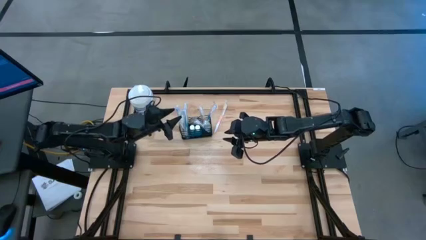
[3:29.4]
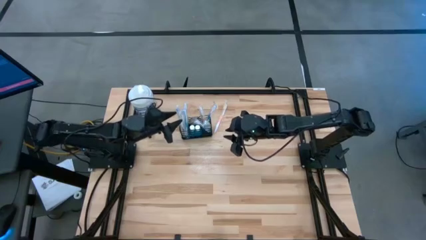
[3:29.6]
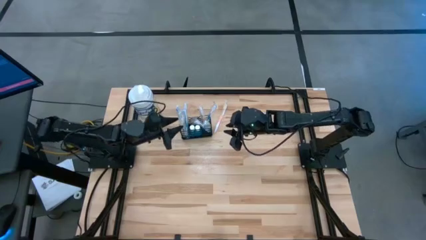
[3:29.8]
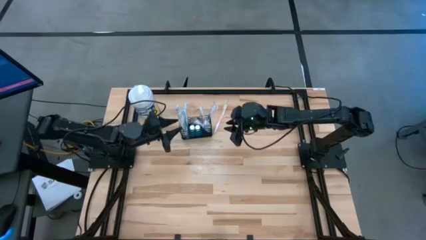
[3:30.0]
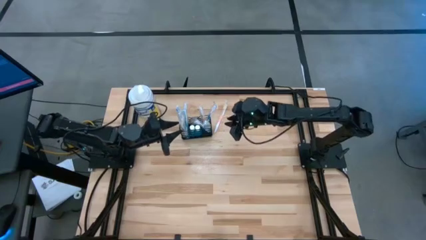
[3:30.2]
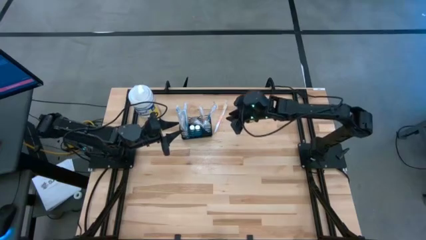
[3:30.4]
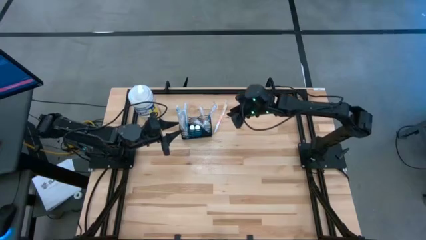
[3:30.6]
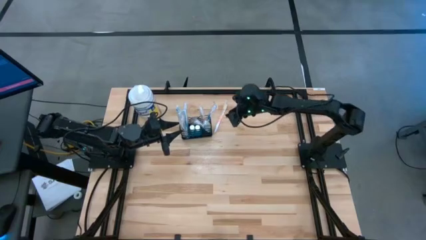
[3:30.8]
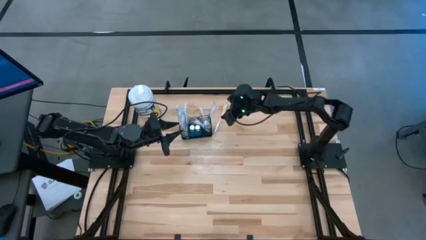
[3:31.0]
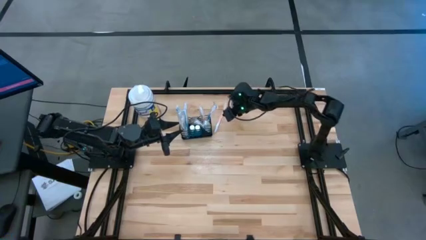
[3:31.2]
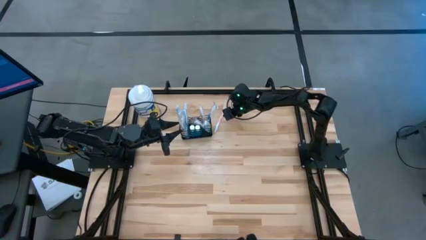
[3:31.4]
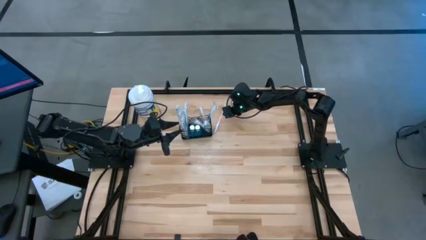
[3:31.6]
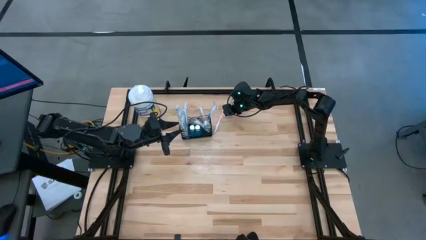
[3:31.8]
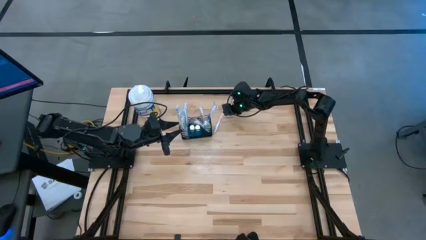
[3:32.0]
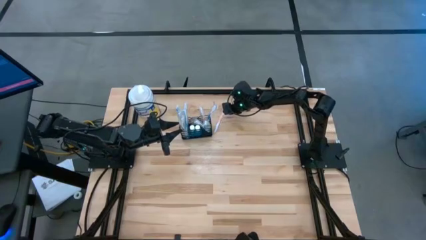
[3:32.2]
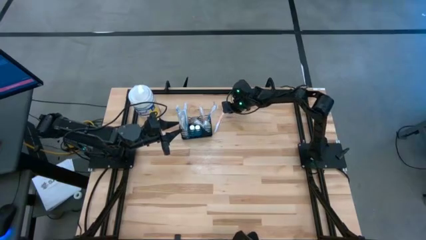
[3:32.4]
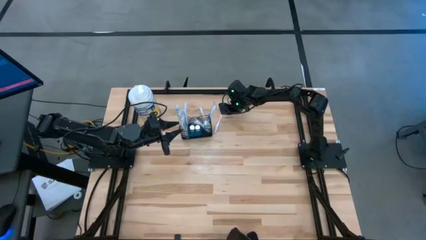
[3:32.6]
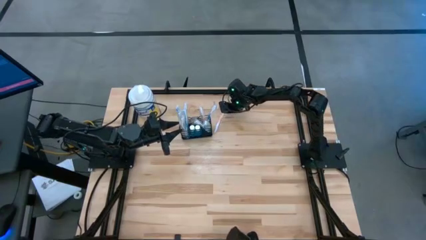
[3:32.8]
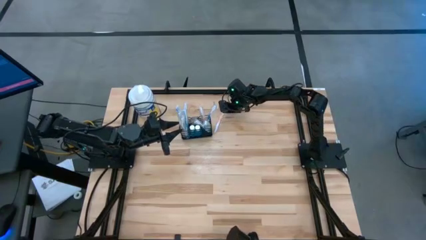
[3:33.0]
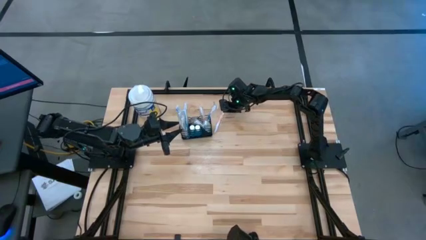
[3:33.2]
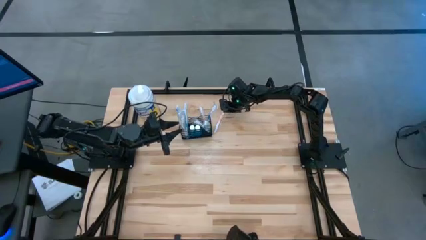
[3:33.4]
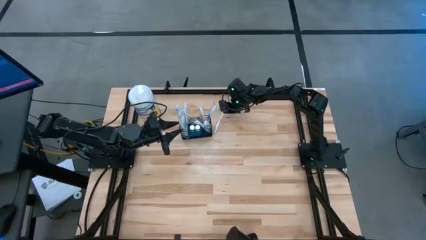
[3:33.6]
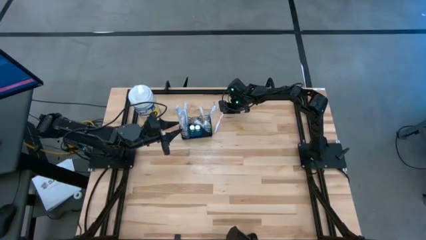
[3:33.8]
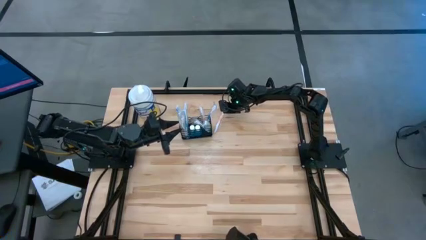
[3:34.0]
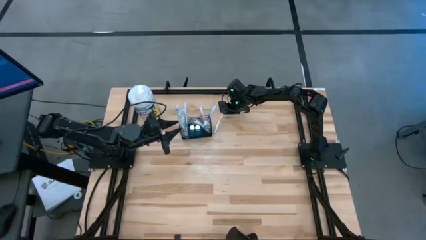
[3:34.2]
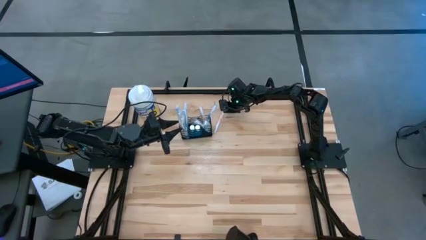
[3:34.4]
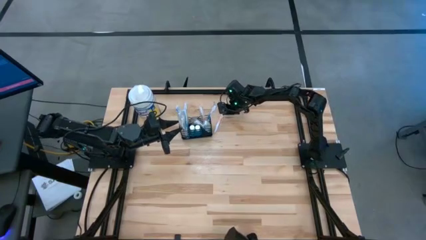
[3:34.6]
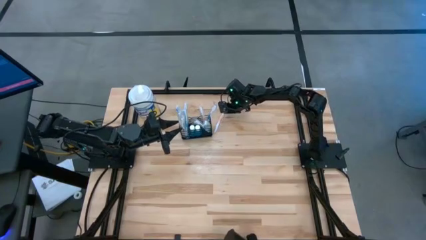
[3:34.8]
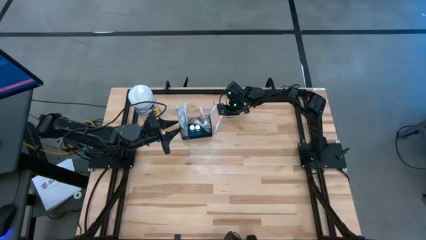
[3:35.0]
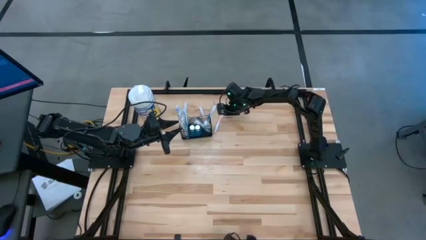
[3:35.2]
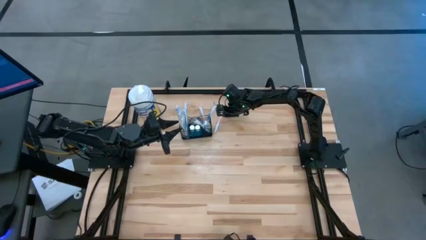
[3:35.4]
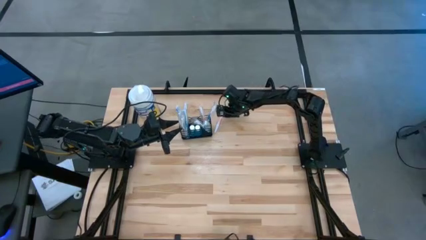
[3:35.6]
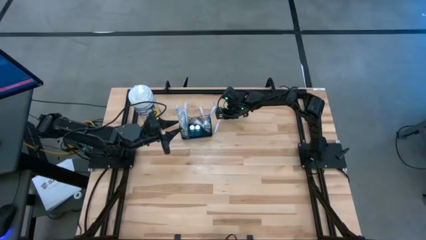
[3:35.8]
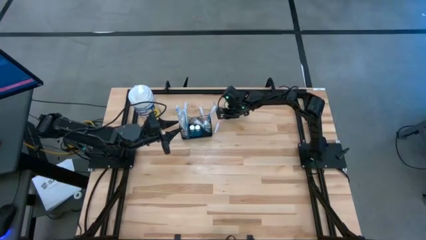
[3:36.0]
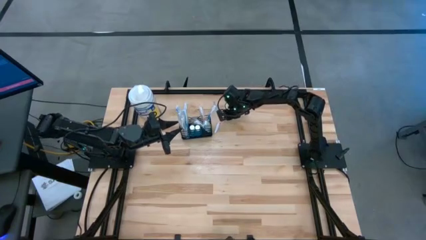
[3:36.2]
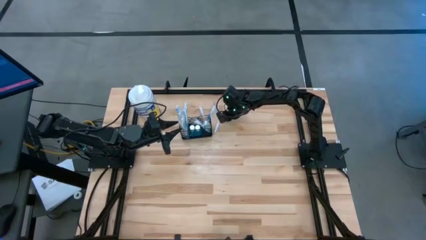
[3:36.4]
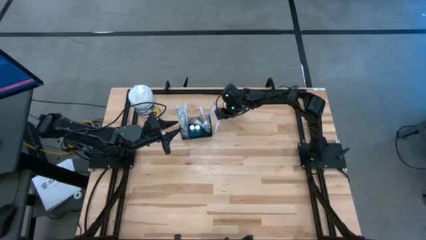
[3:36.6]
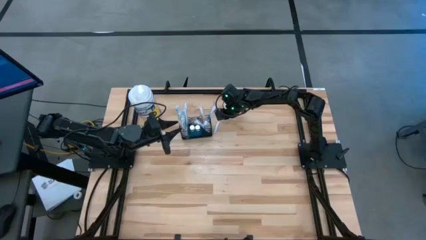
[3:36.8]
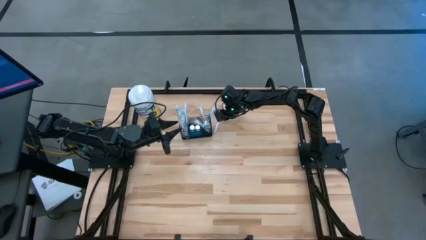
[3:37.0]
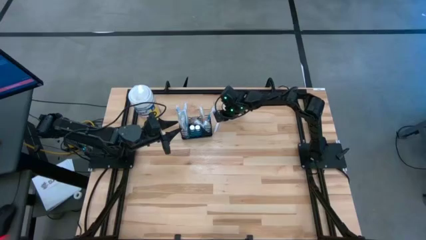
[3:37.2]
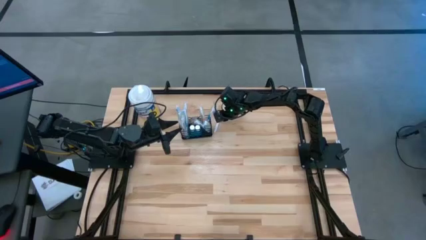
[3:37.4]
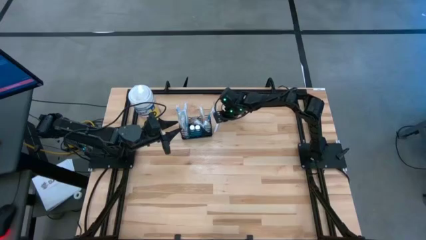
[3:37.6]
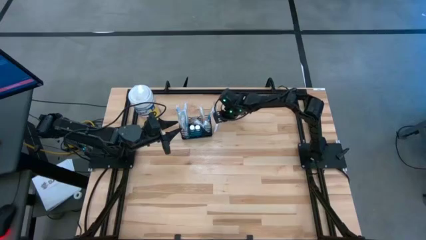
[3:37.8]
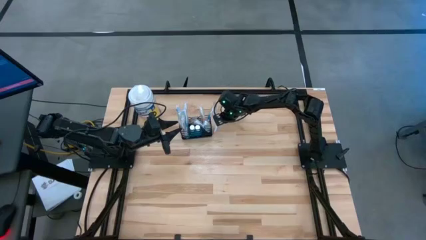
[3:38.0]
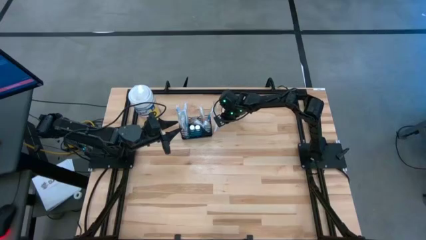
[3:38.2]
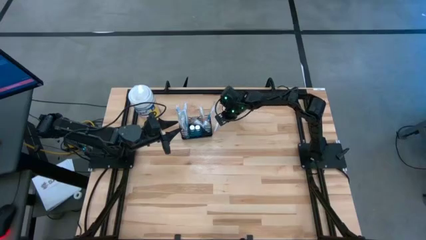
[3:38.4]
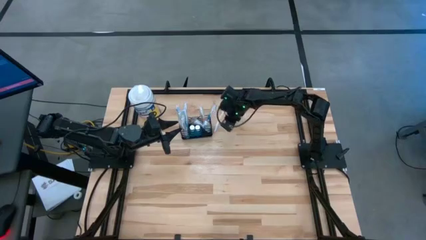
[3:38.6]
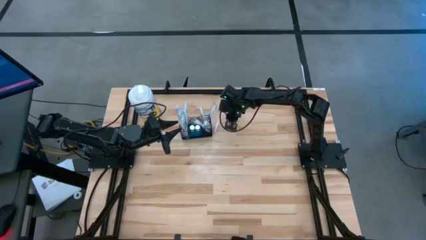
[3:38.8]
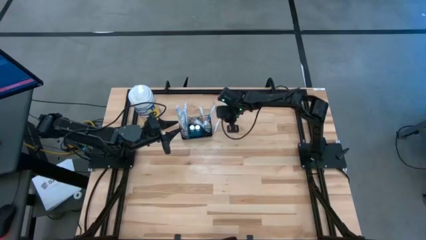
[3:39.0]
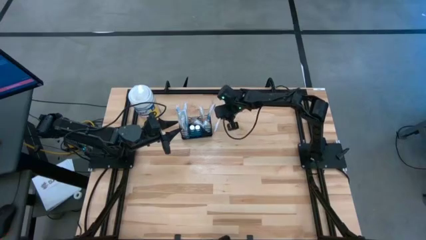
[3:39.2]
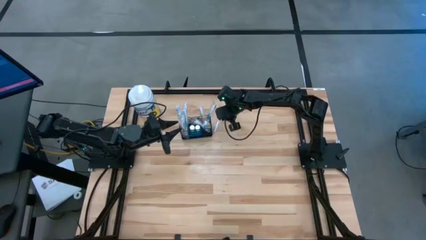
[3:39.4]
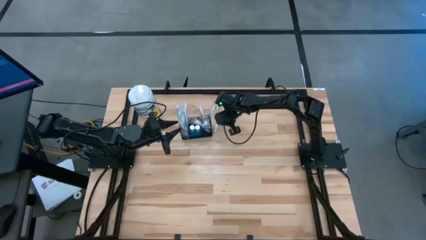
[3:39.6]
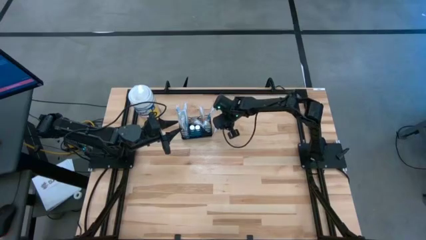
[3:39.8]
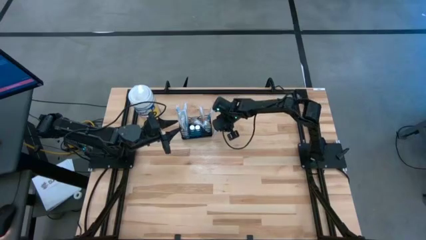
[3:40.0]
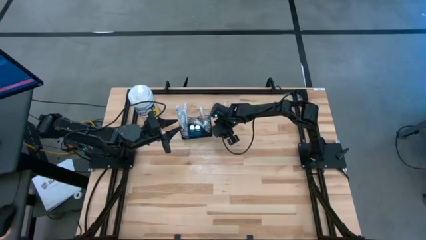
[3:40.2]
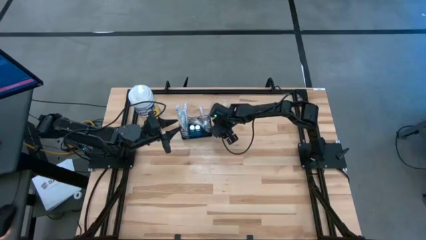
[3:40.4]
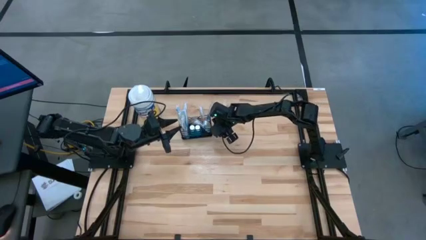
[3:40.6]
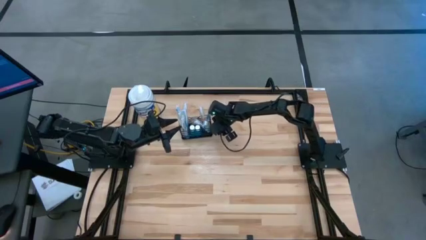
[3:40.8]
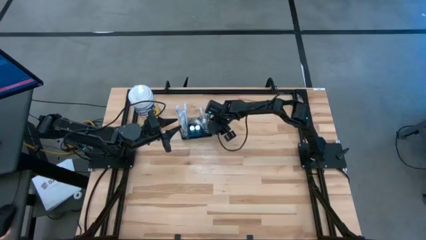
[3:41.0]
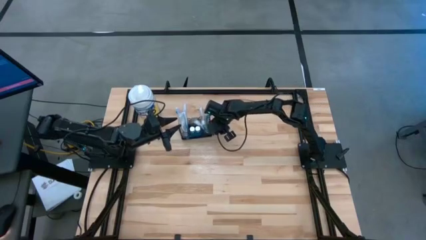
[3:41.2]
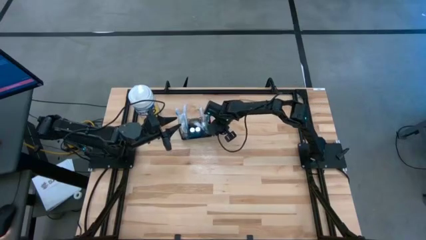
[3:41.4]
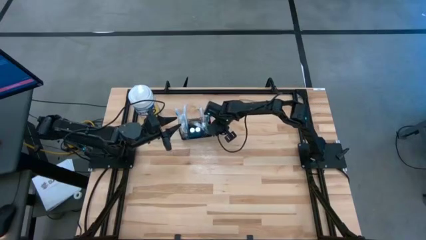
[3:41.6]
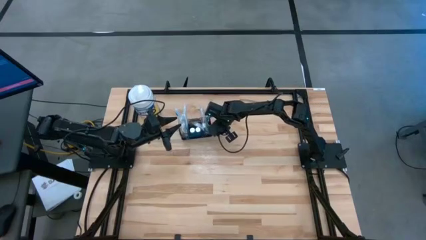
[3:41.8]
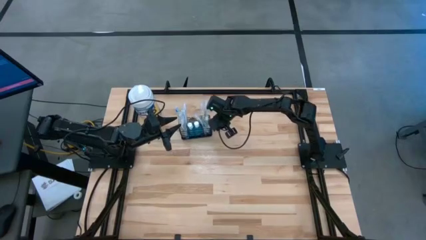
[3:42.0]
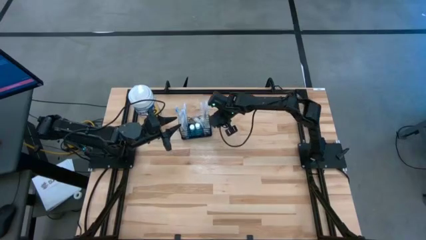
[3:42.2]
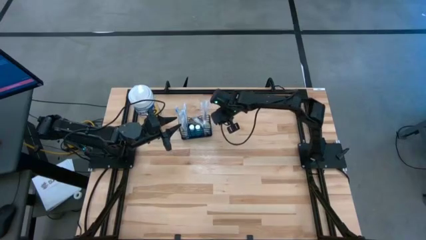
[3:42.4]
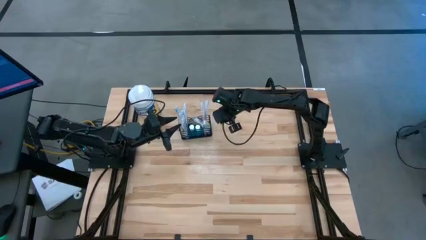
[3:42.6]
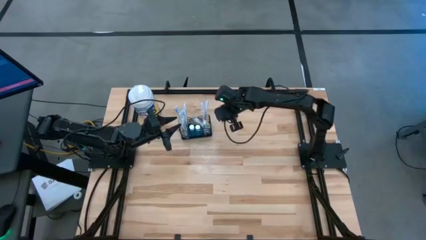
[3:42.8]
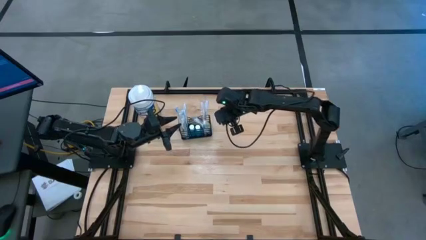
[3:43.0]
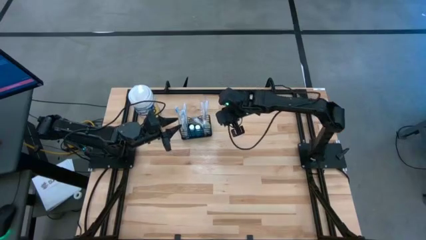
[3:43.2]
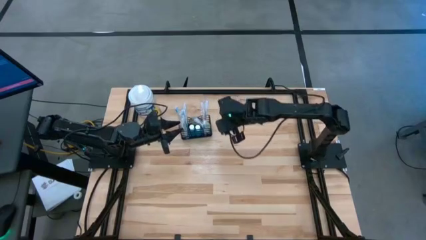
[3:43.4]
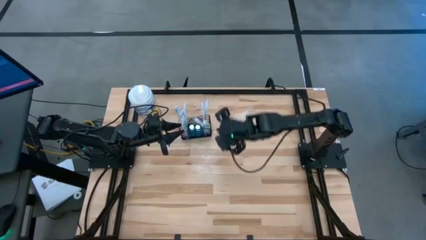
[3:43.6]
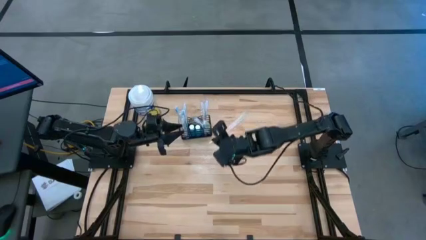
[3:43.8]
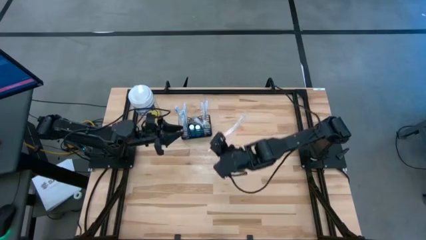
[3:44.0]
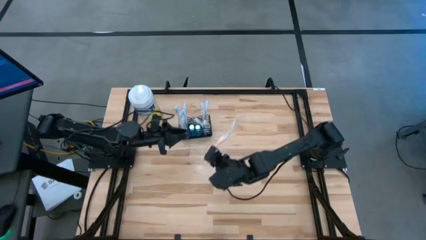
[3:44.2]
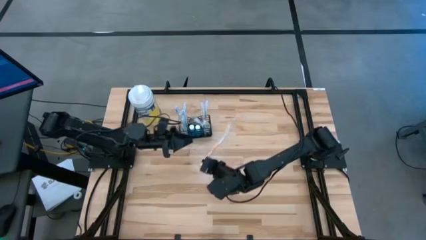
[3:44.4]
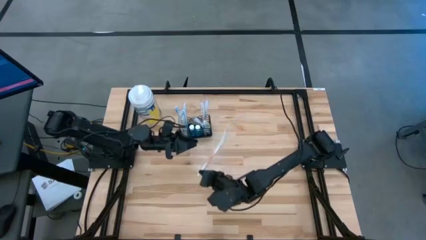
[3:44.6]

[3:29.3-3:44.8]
Task: Pick & Place toothbrushing station
Put the orange toothbrush into the mesh organizer
